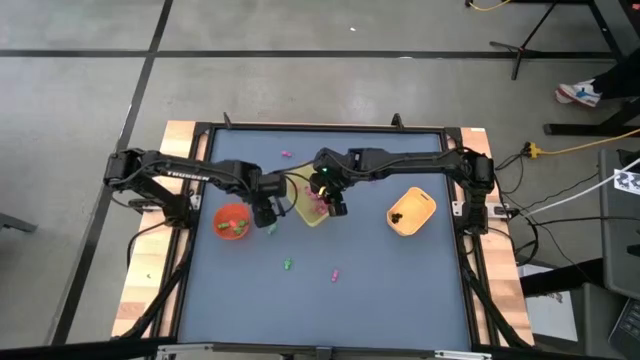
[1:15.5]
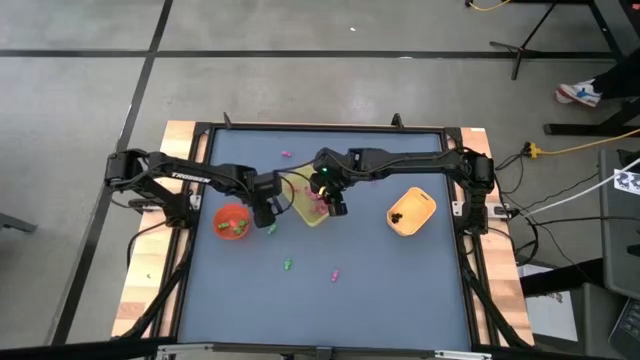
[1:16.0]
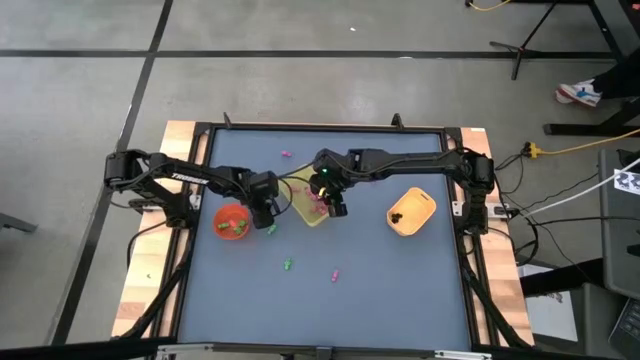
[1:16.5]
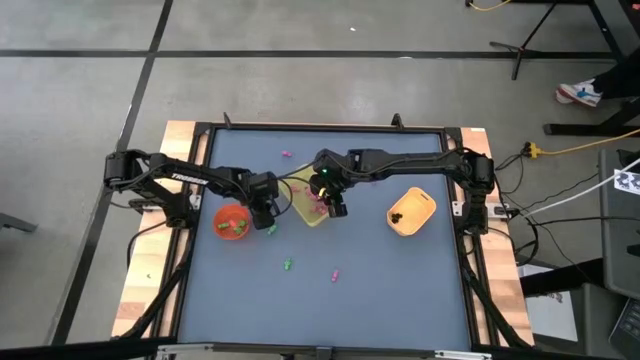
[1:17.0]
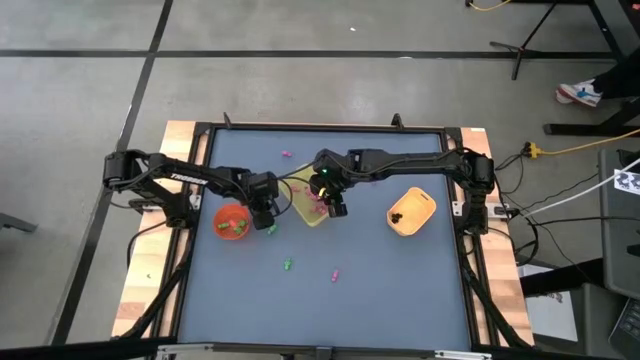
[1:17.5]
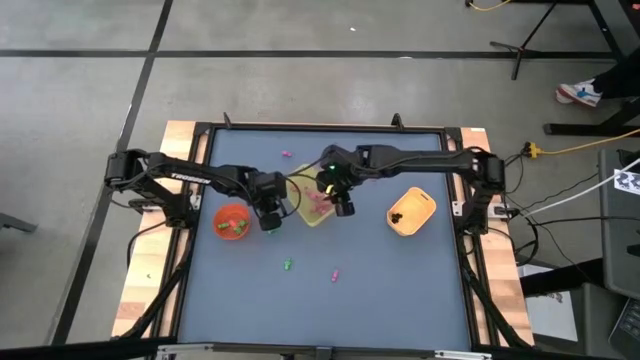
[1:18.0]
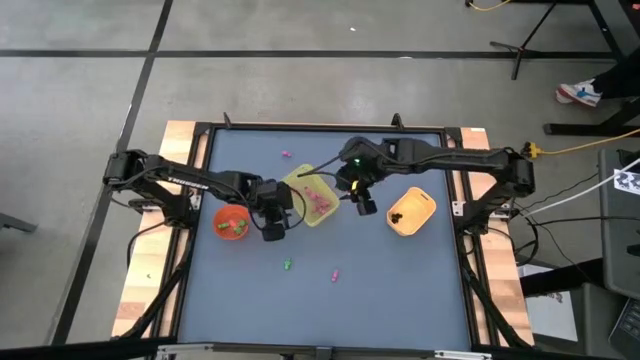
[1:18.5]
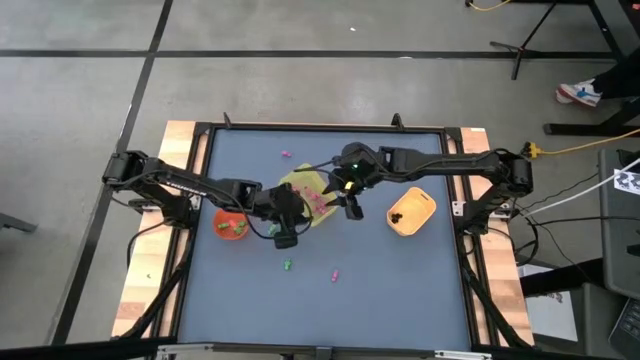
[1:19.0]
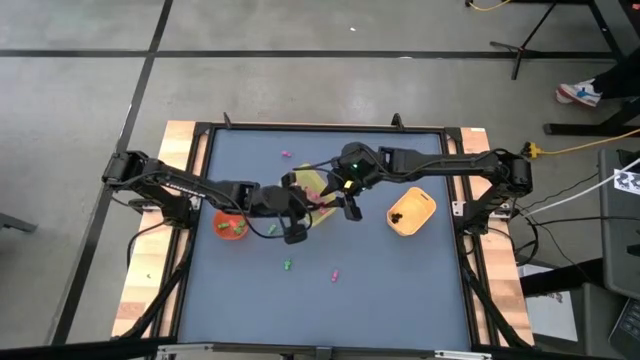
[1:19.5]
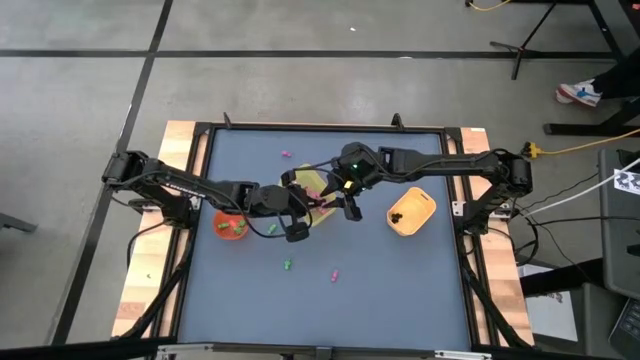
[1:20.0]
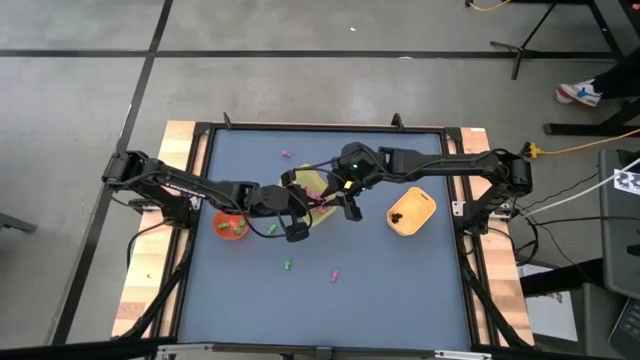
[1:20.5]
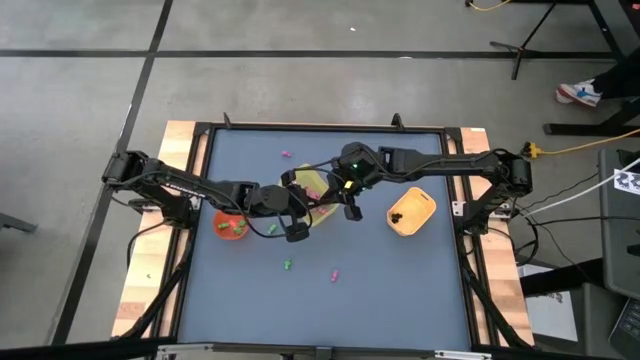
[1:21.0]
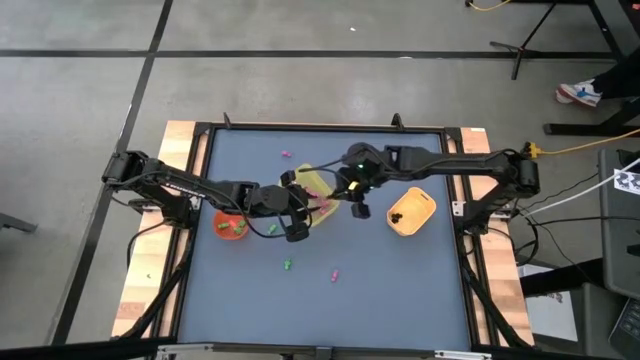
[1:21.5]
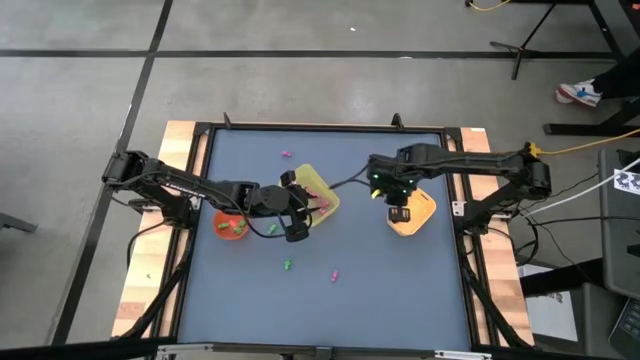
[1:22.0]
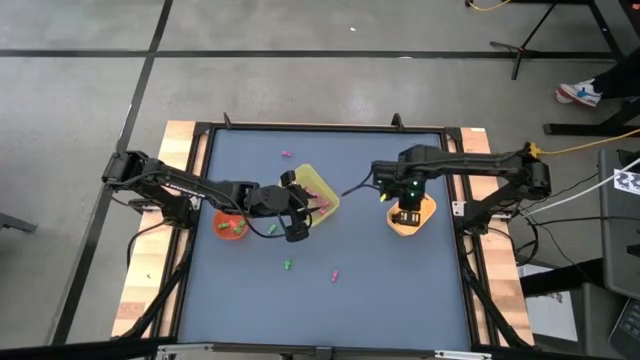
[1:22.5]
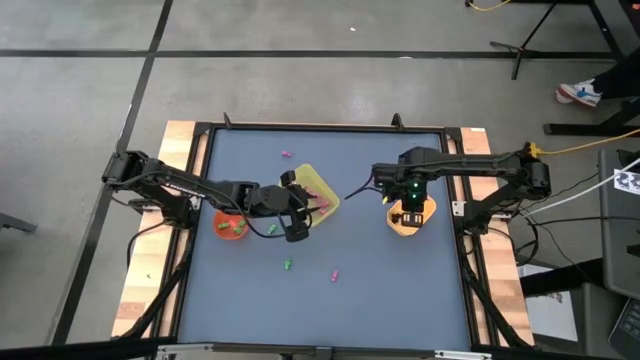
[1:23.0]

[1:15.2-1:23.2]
Task: Sort Halloween decoration
Put the black skeleton toy into the yellow-orange bin

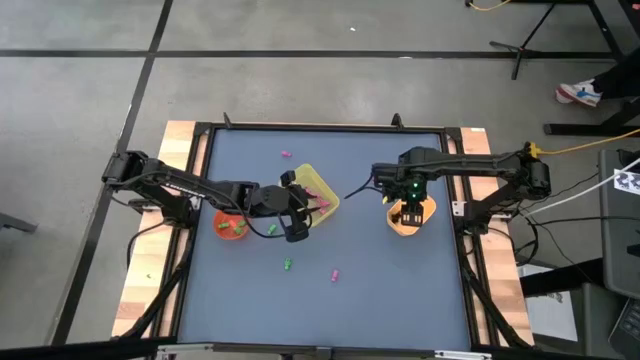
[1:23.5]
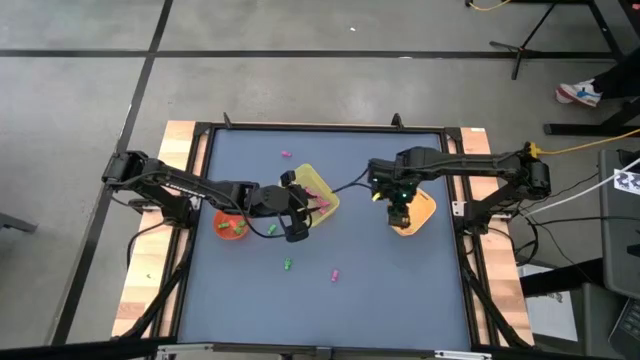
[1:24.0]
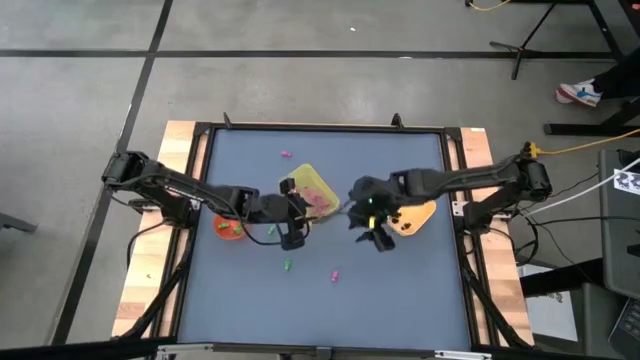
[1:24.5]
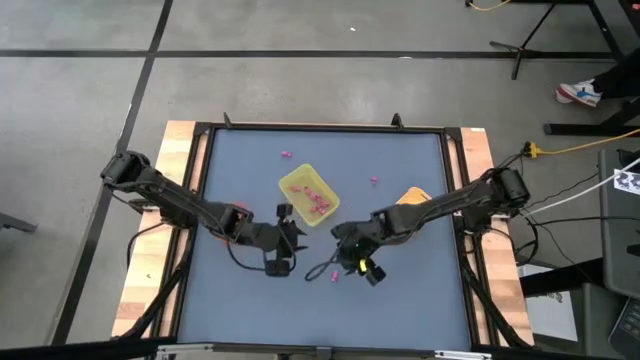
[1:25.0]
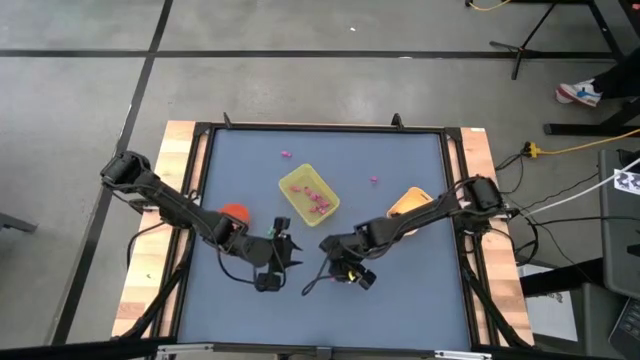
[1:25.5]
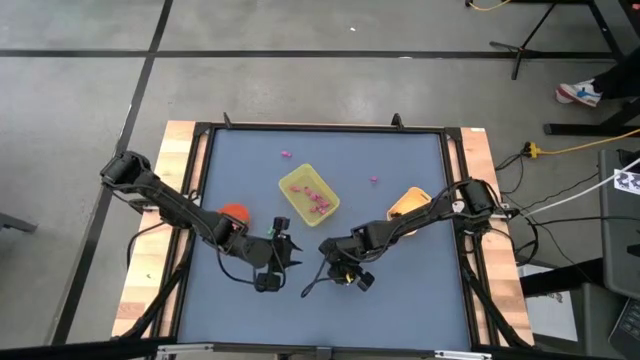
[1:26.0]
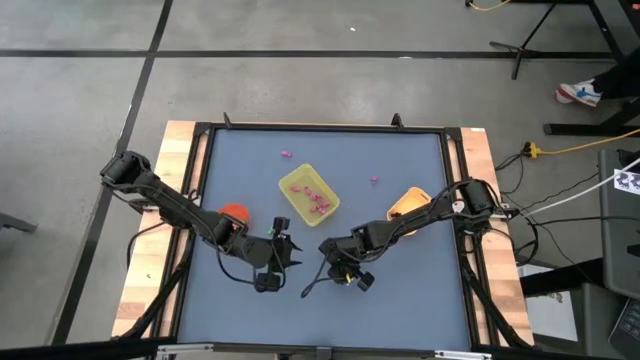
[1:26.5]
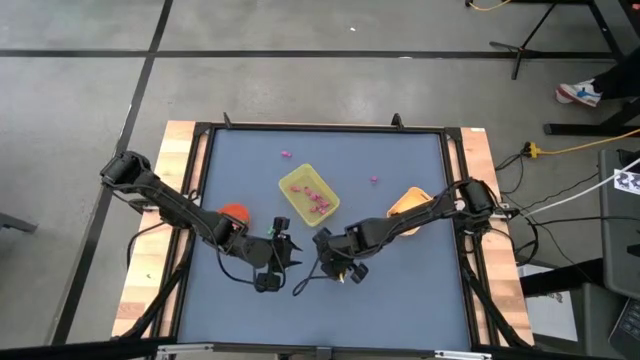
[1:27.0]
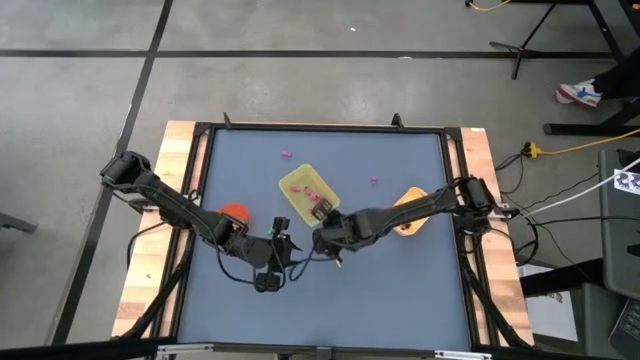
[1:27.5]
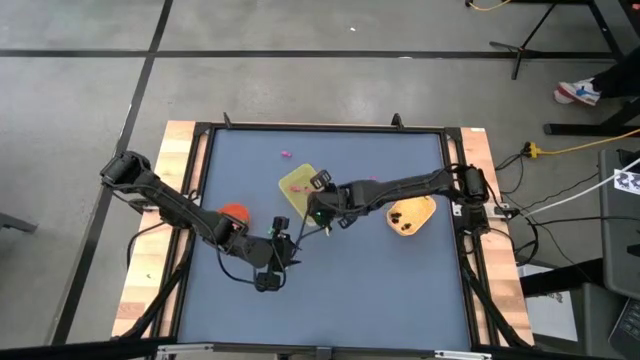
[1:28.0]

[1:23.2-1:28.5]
Put the pink skeleton toy into the yellow bin

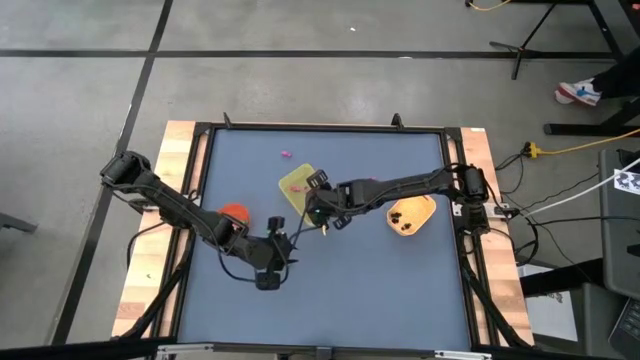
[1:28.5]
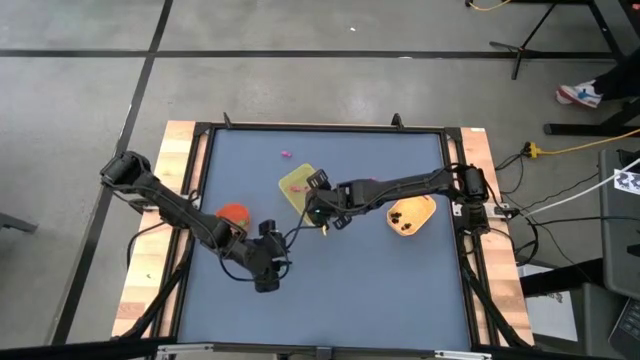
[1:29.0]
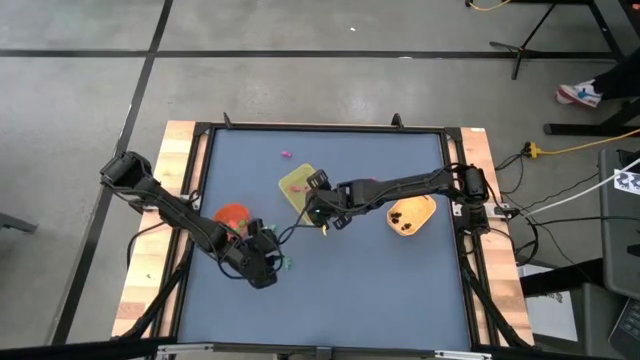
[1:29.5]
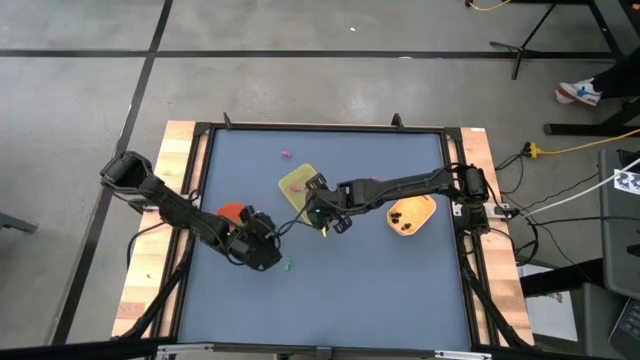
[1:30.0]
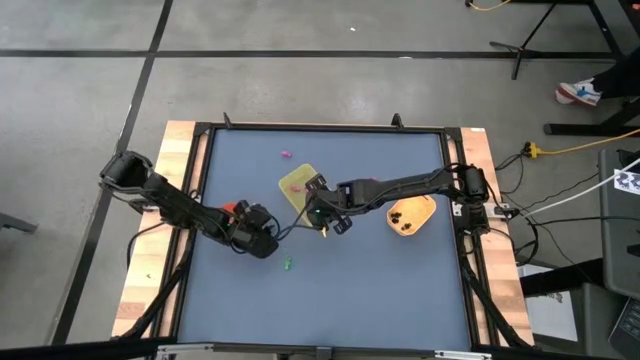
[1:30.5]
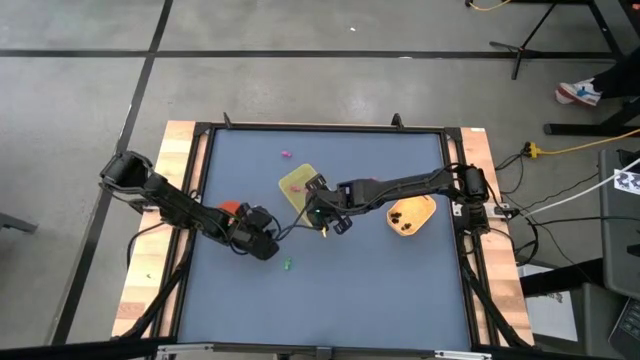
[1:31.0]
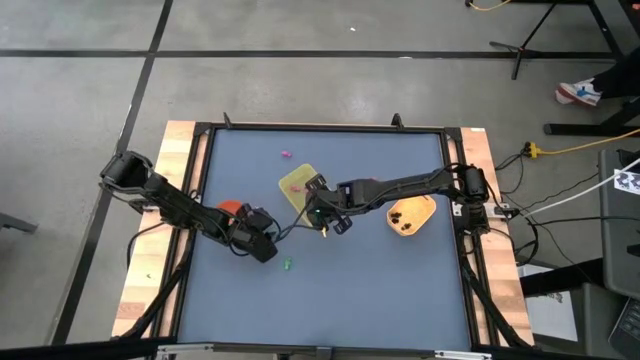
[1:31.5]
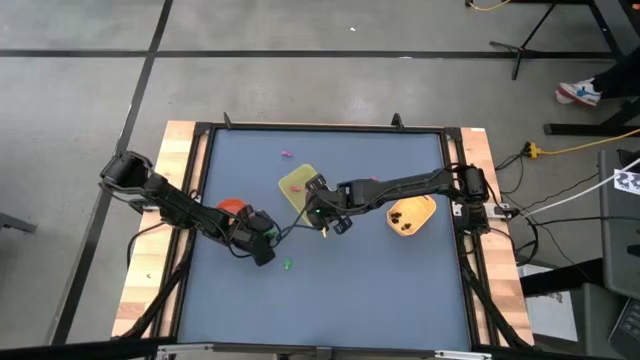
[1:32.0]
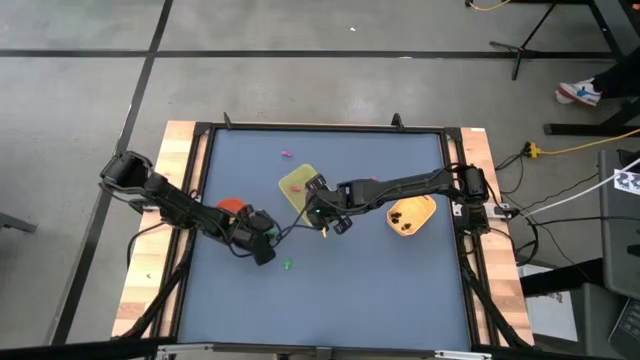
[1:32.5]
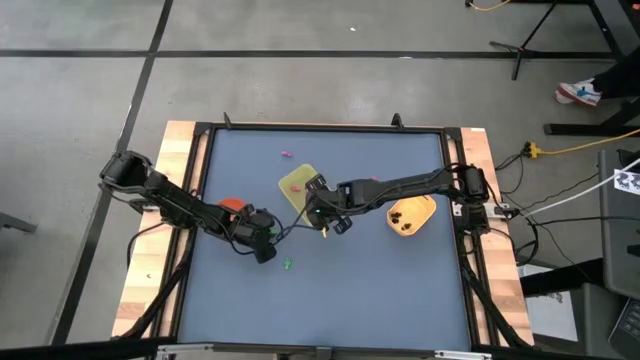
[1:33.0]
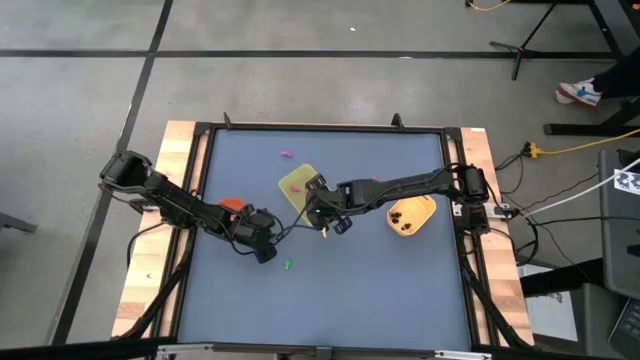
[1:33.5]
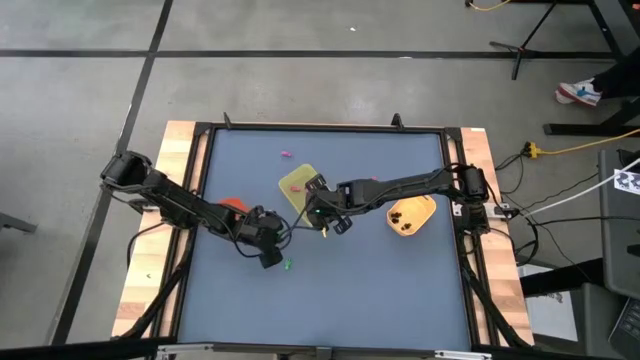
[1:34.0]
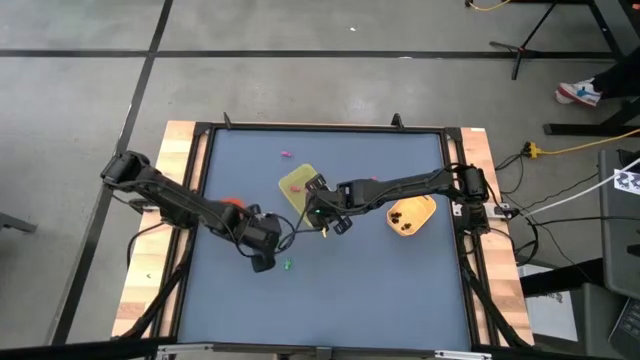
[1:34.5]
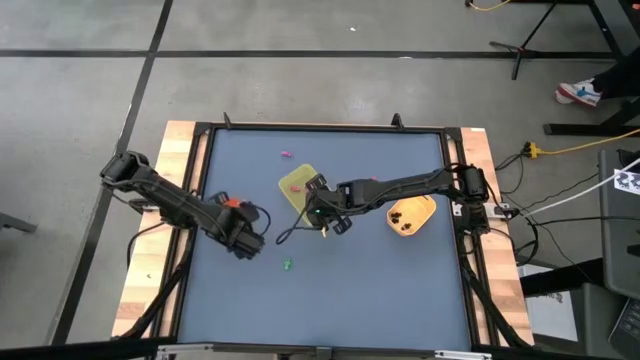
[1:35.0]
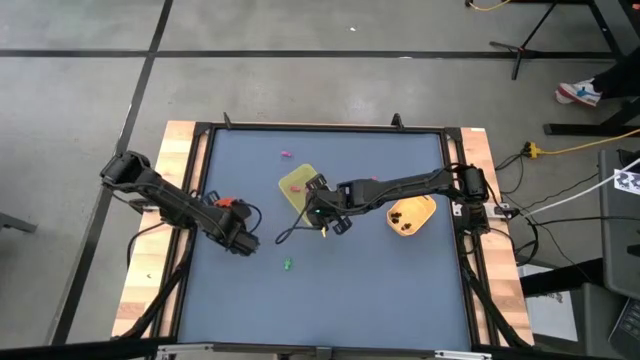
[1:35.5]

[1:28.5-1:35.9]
Put the green skeleton toy into the orange bin
